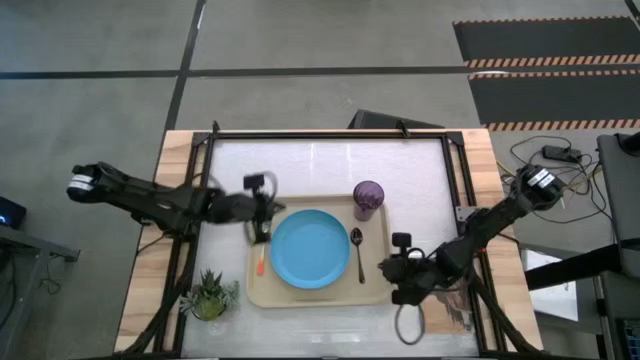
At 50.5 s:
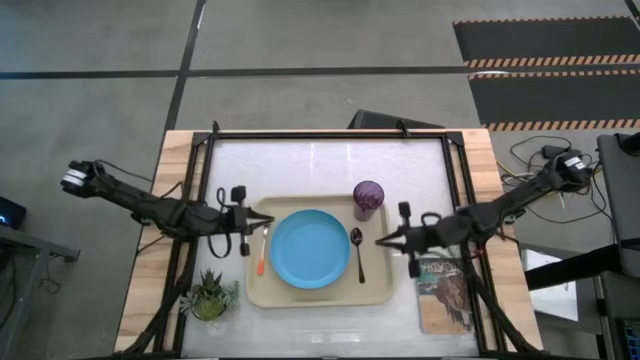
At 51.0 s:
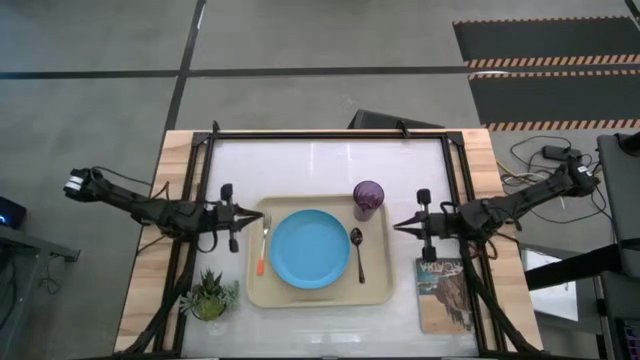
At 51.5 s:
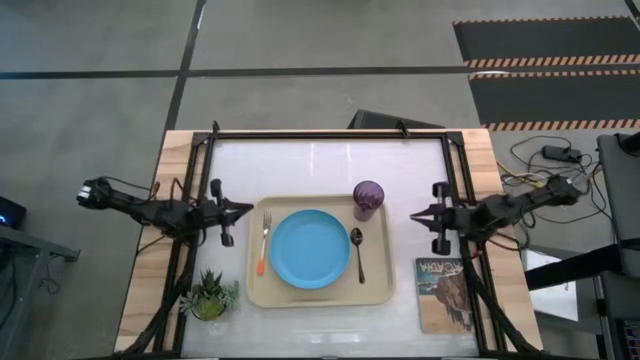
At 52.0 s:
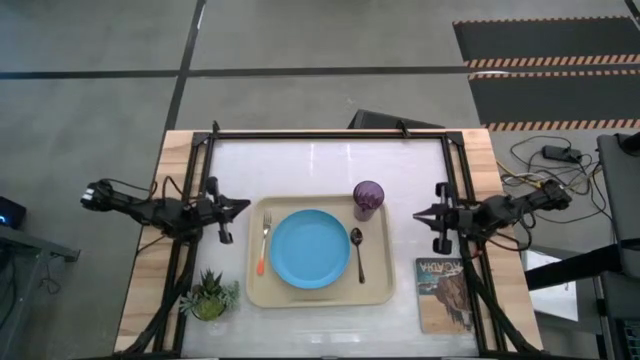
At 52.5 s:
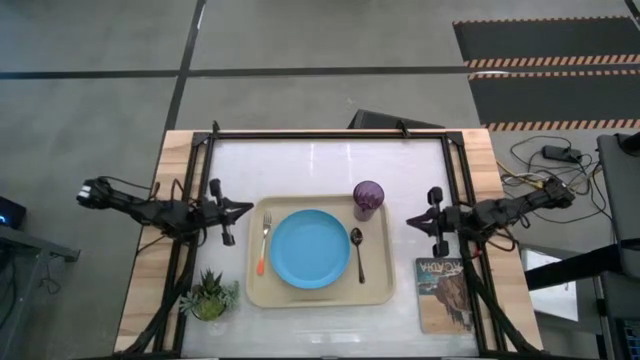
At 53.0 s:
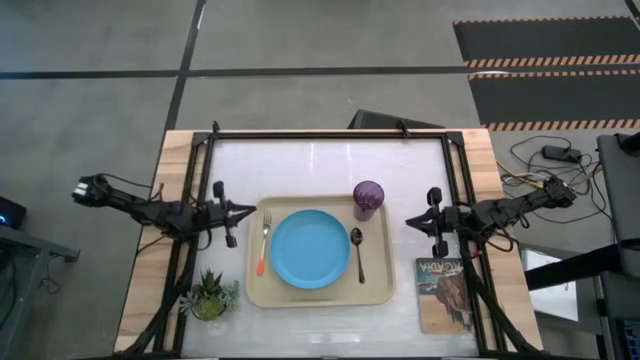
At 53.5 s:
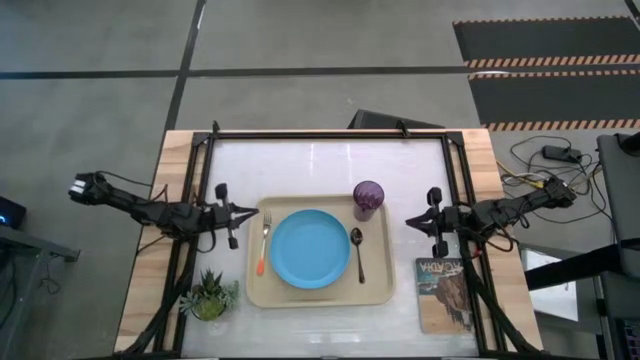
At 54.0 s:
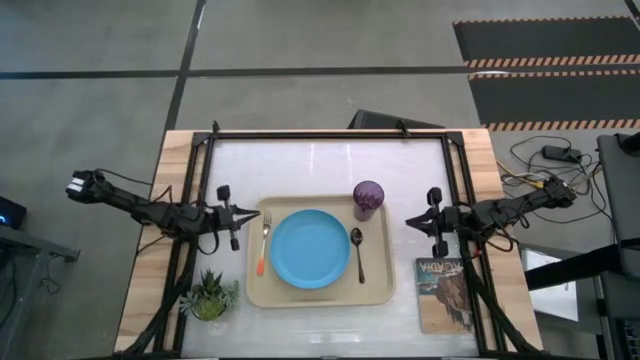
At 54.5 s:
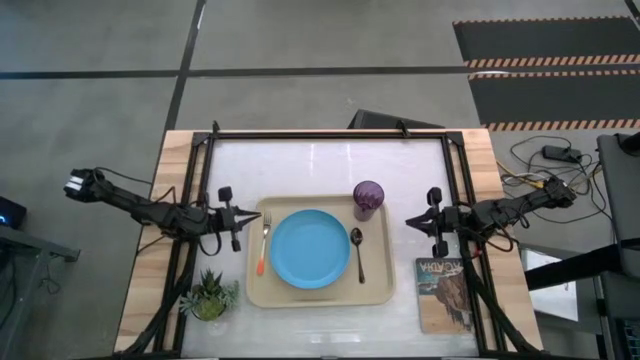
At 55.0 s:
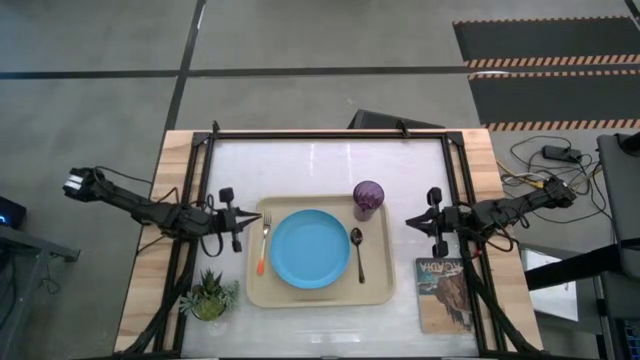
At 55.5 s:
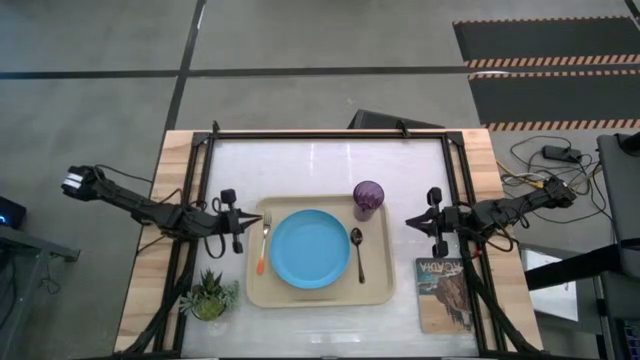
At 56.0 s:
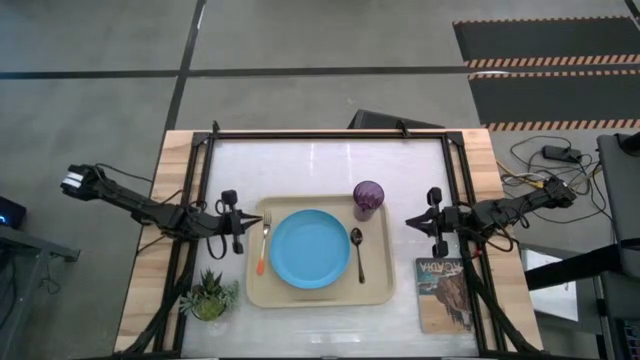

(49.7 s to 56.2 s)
Task: Pick and place plate/cup/fork/spoon on tray
Return to Home Position

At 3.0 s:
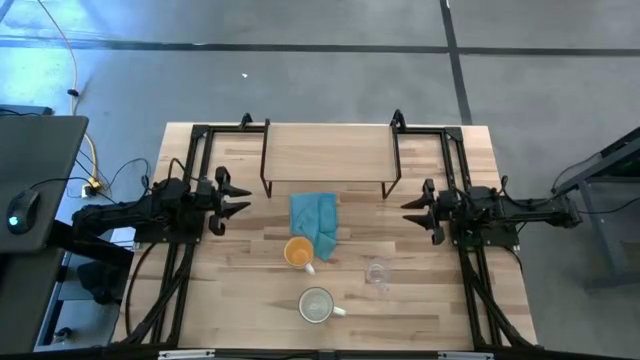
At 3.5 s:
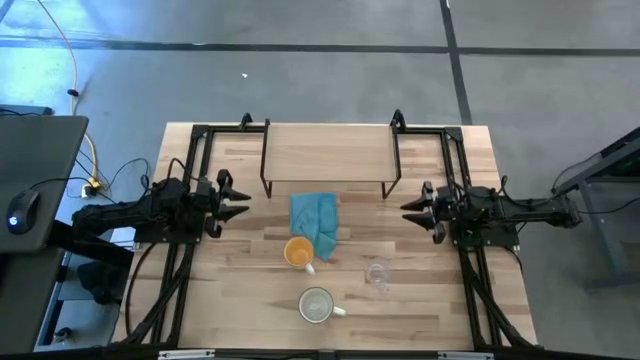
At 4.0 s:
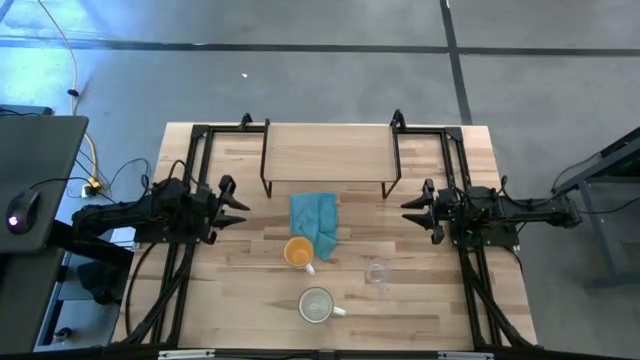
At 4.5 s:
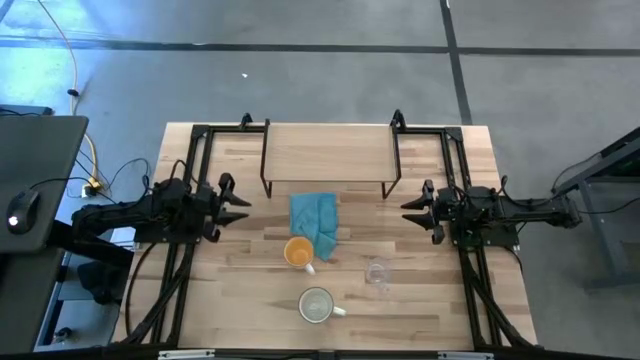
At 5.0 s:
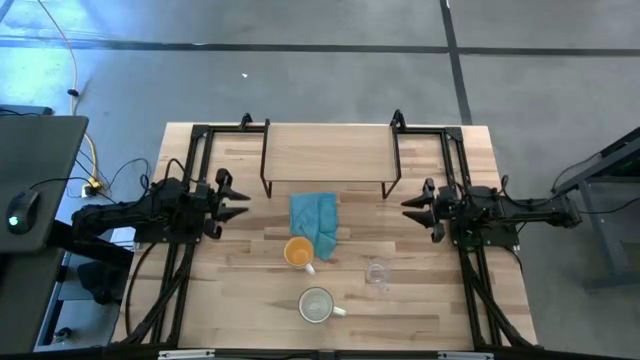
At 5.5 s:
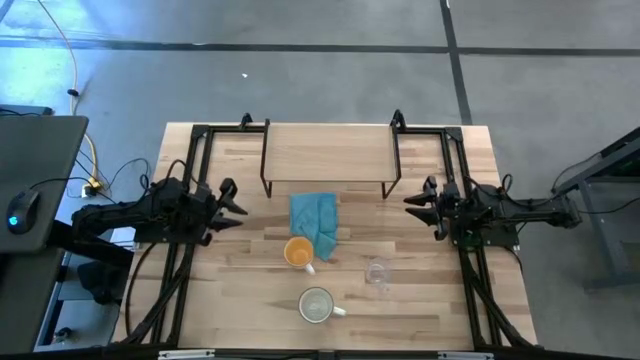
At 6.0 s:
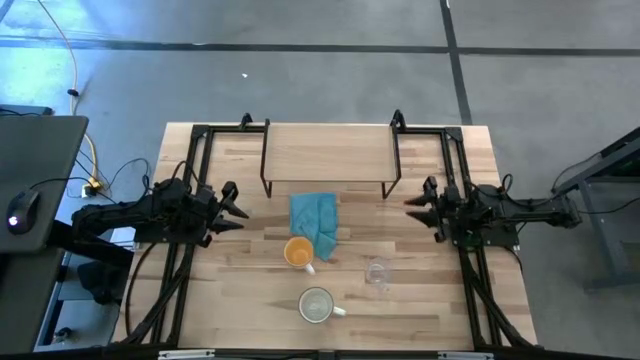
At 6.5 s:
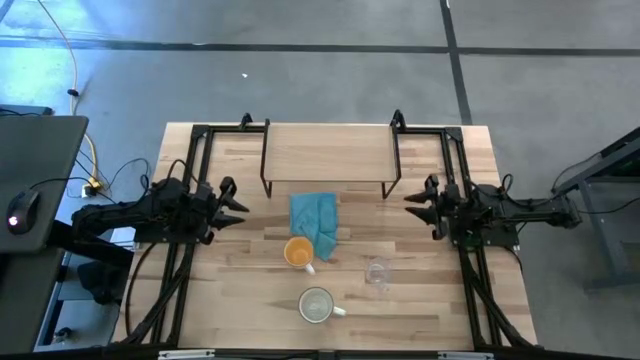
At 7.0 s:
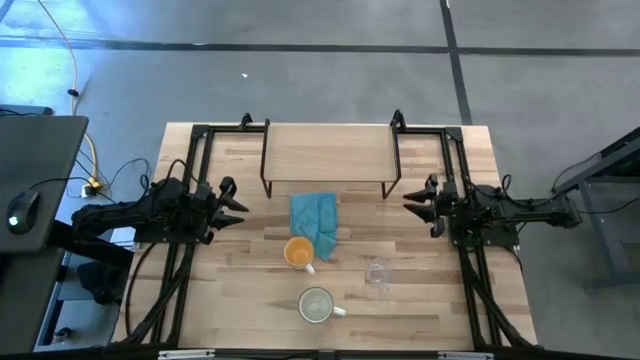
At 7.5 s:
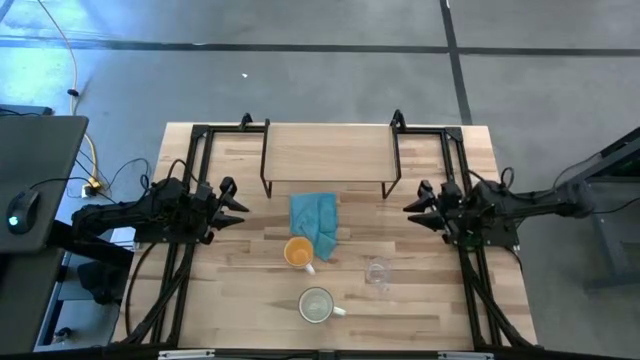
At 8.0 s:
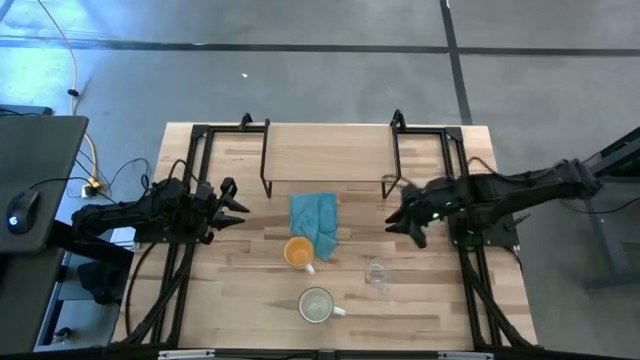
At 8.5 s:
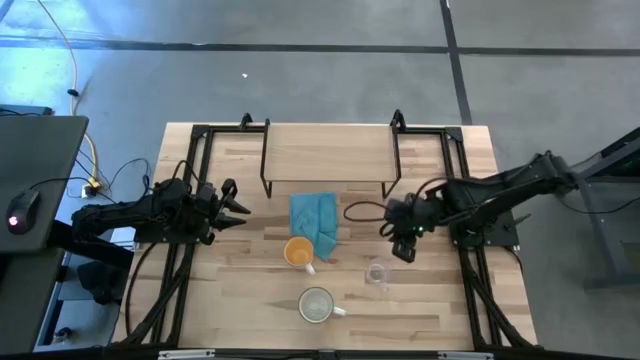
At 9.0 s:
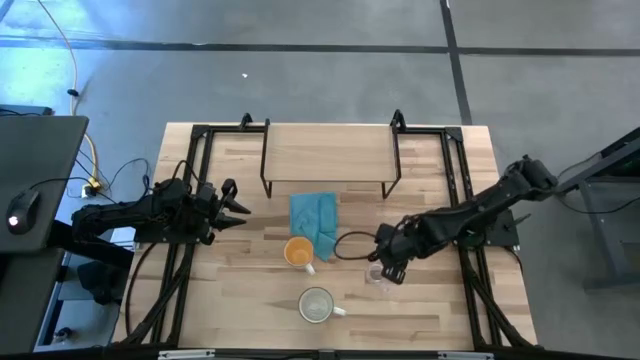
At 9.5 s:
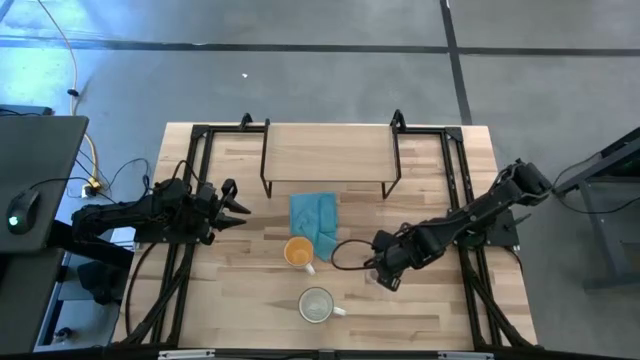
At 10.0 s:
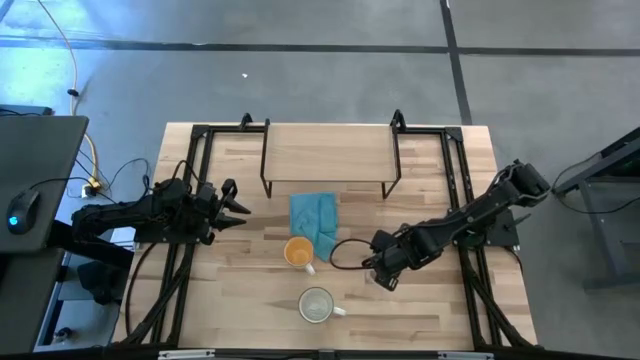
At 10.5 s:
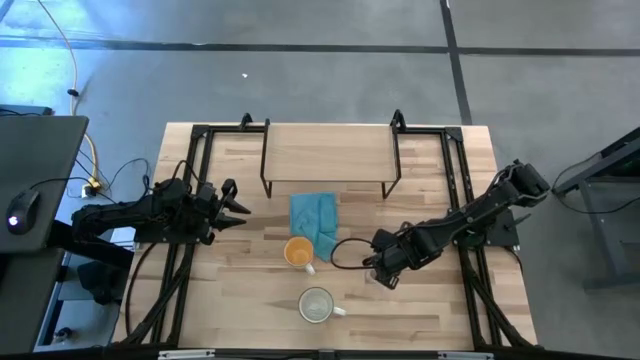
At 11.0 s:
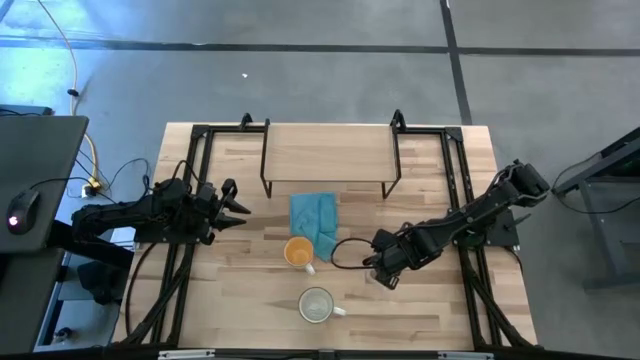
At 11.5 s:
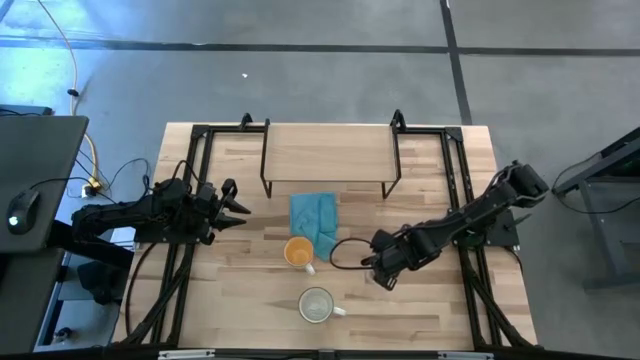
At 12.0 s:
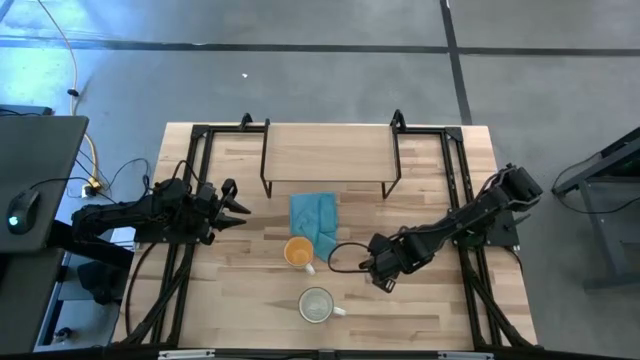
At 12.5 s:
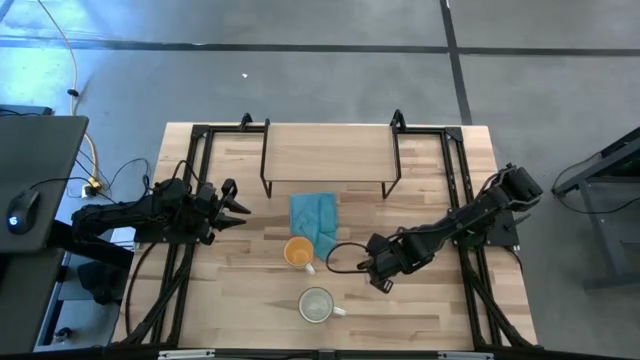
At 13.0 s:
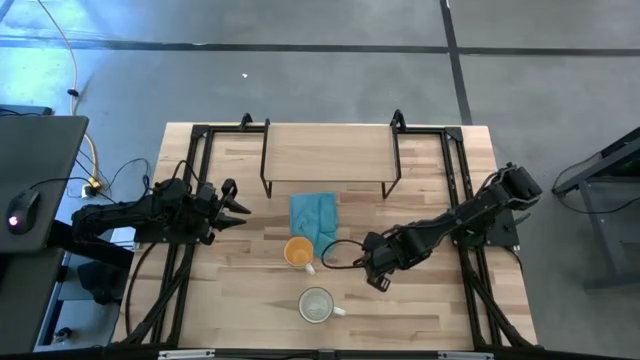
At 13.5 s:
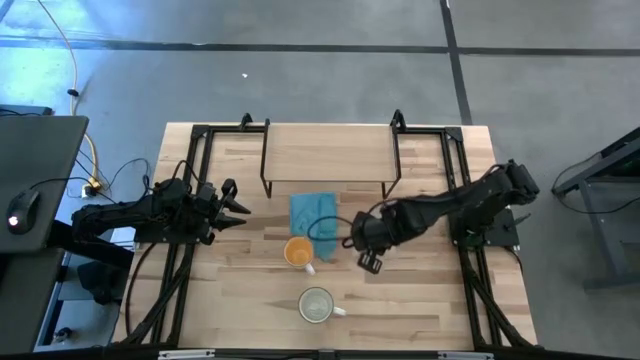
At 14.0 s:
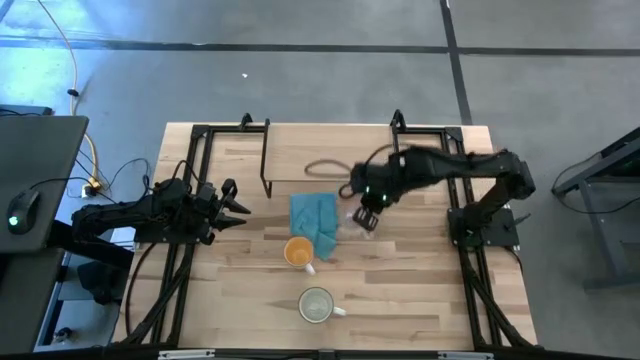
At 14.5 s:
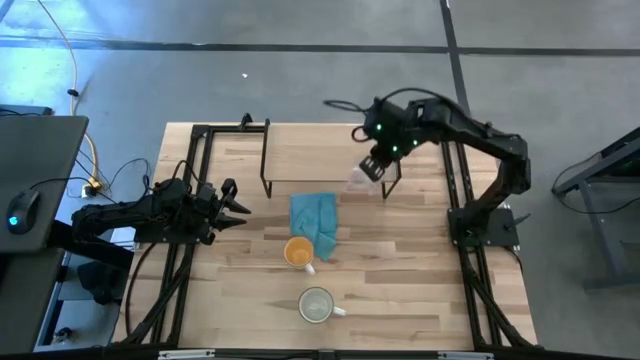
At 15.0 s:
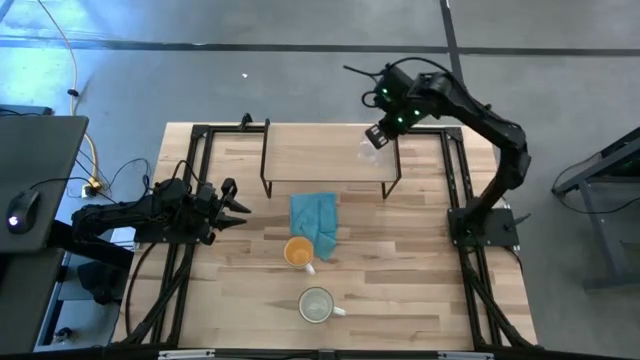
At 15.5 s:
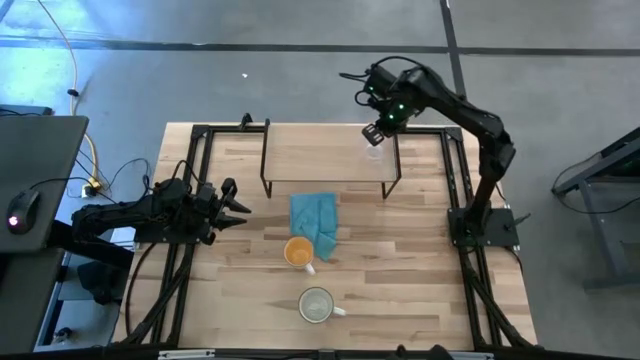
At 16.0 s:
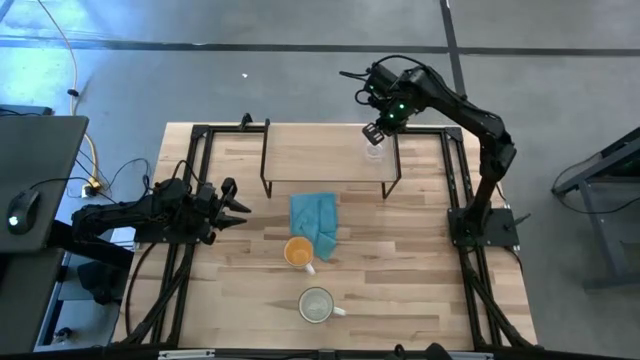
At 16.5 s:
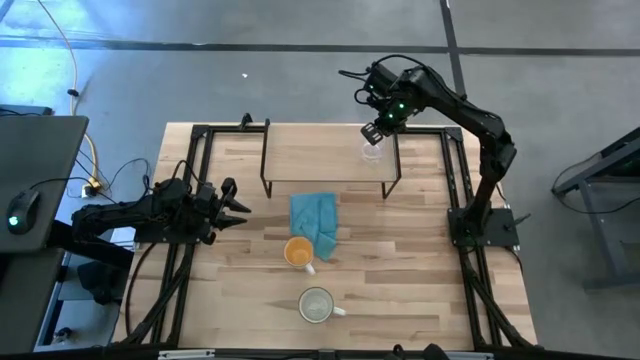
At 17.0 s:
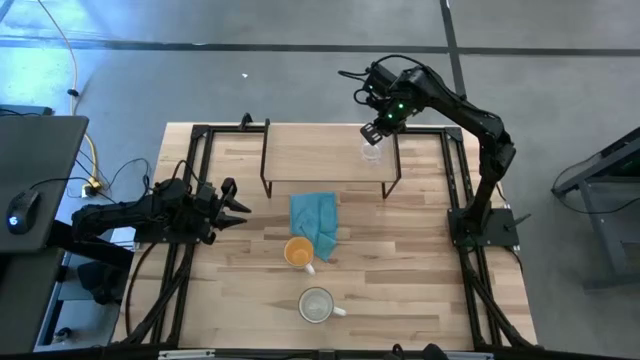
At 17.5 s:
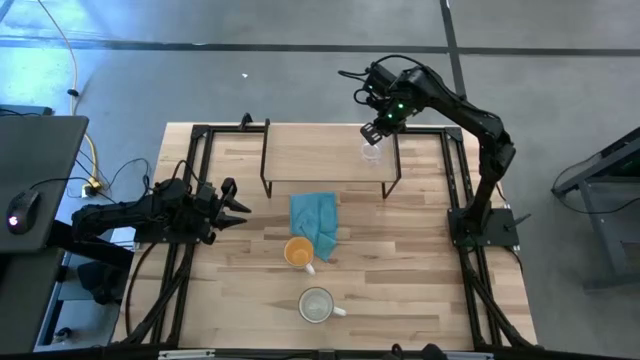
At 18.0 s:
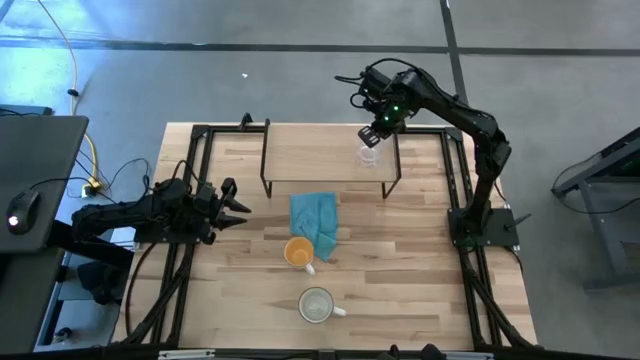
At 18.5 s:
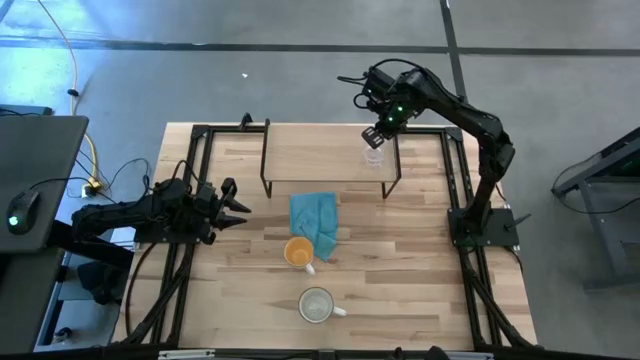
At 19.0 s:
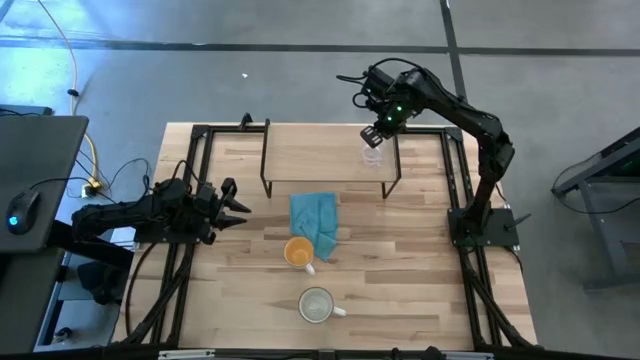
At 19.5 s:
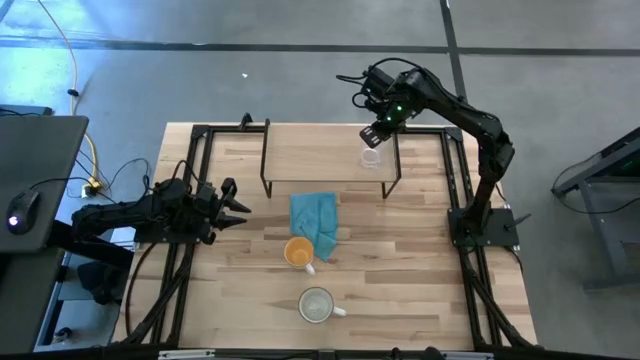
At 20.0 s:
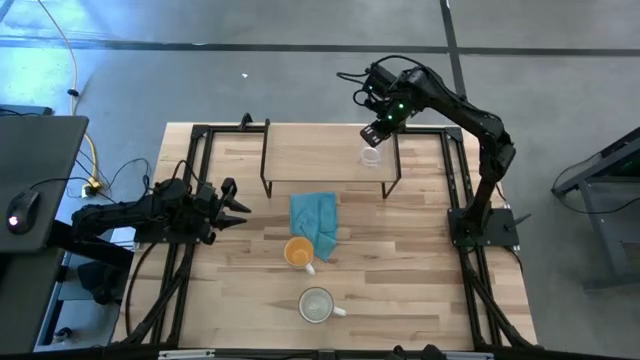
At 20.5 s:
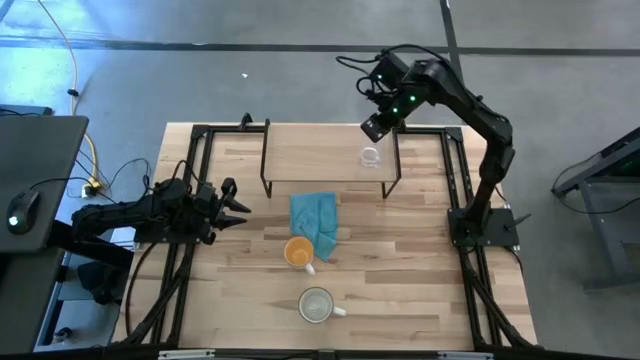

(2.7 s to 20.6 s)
Task: Stack small to large cups/mugs on shelf
Put the transparent mug on the shelf
